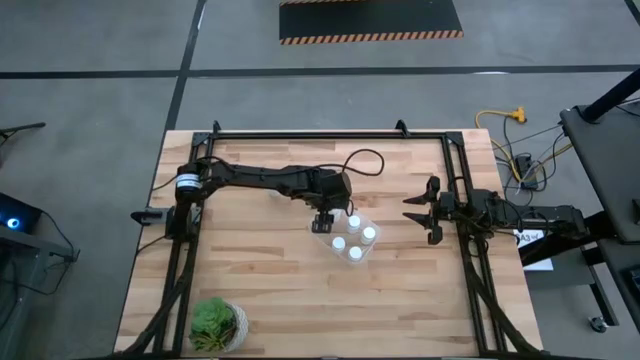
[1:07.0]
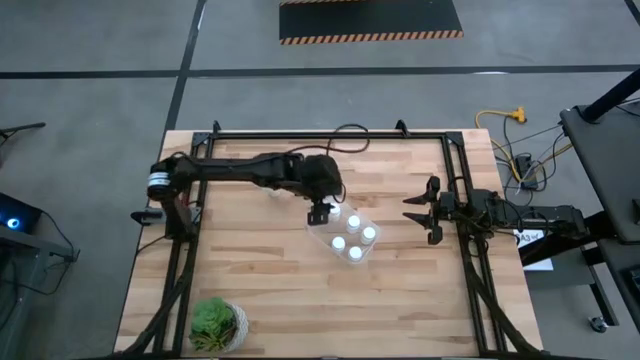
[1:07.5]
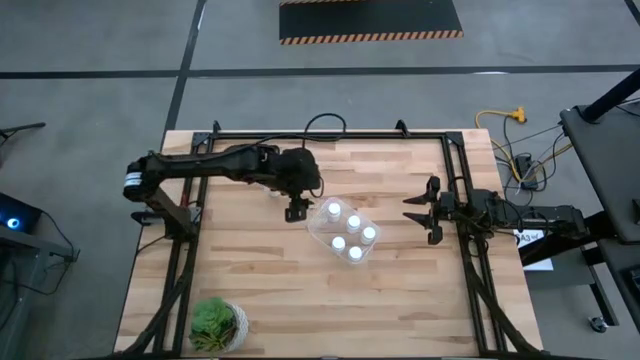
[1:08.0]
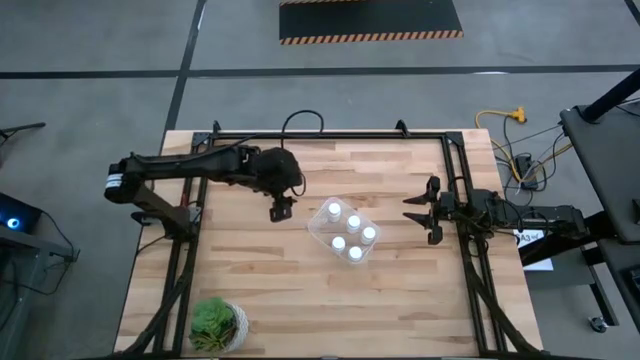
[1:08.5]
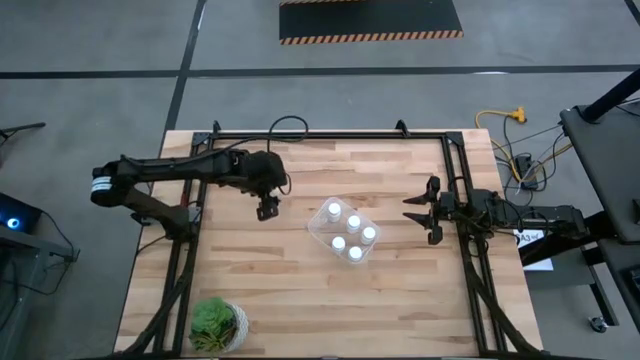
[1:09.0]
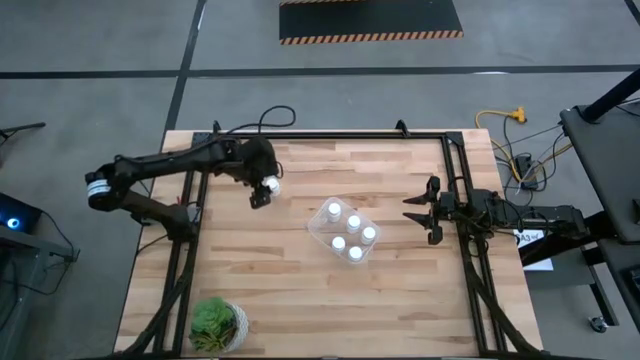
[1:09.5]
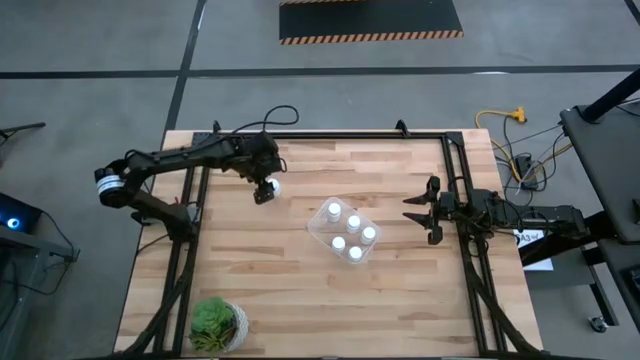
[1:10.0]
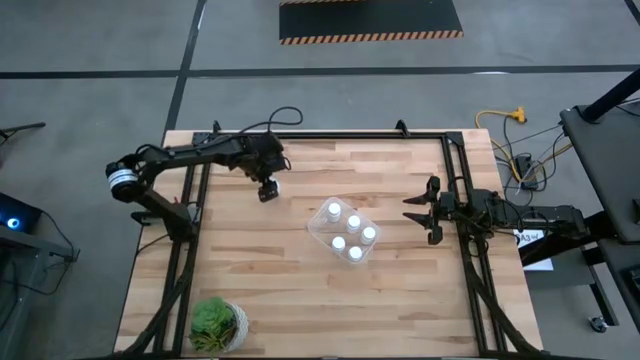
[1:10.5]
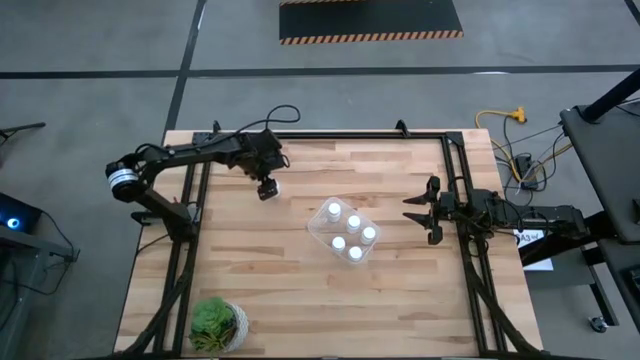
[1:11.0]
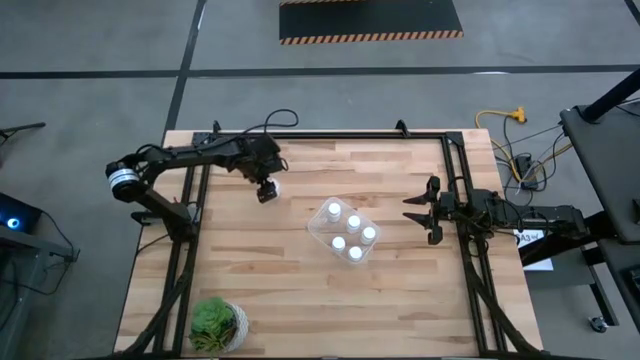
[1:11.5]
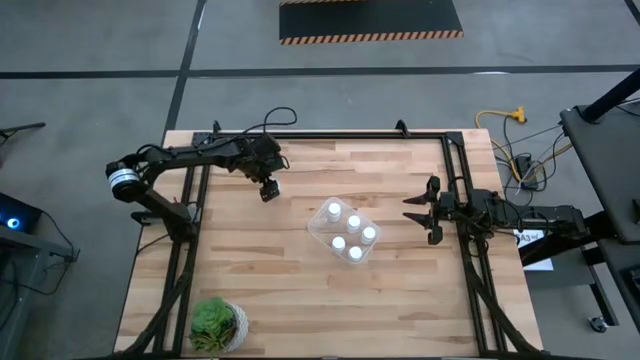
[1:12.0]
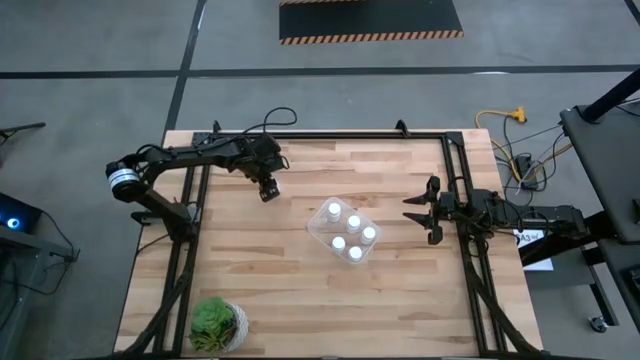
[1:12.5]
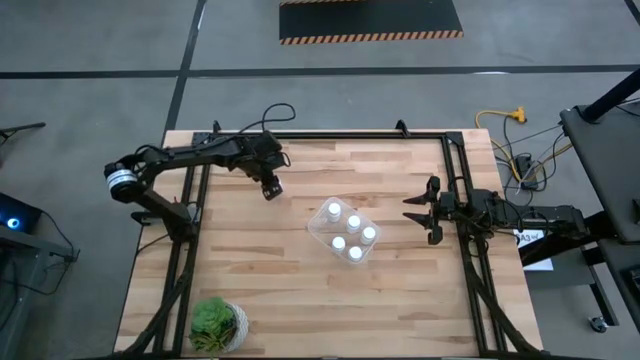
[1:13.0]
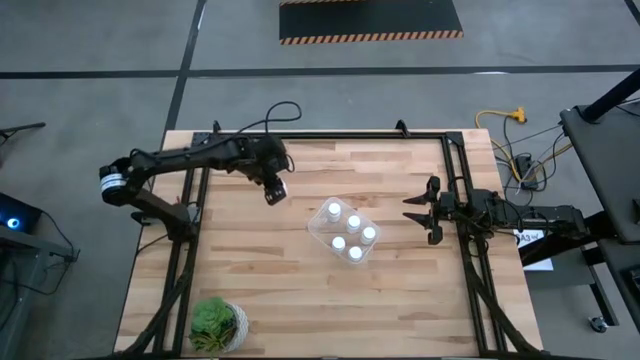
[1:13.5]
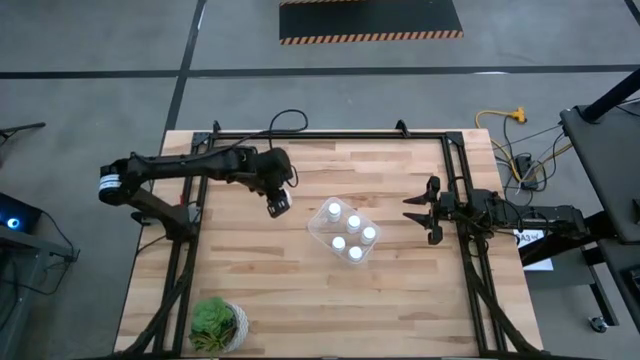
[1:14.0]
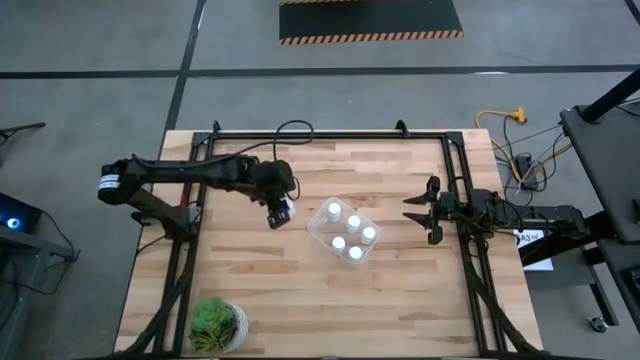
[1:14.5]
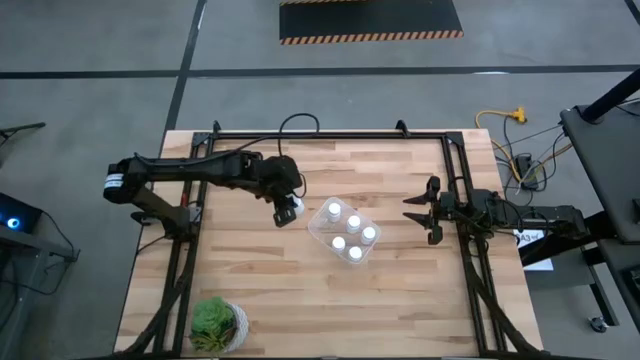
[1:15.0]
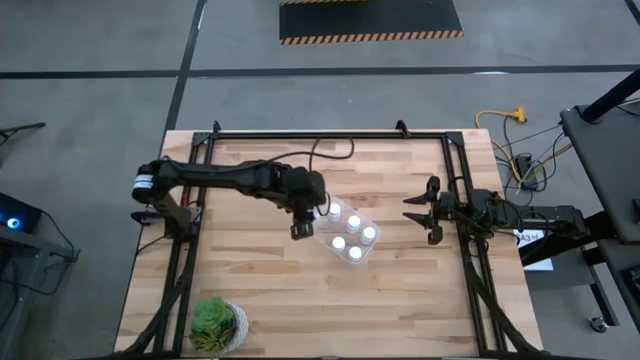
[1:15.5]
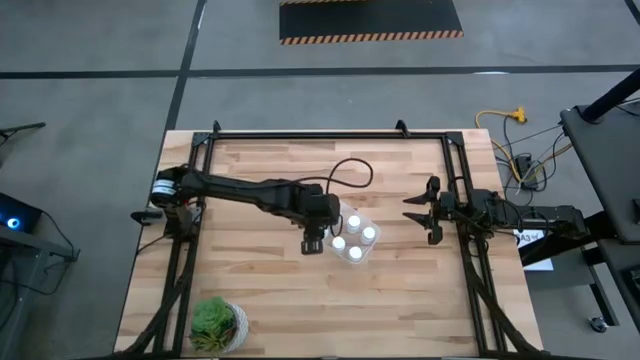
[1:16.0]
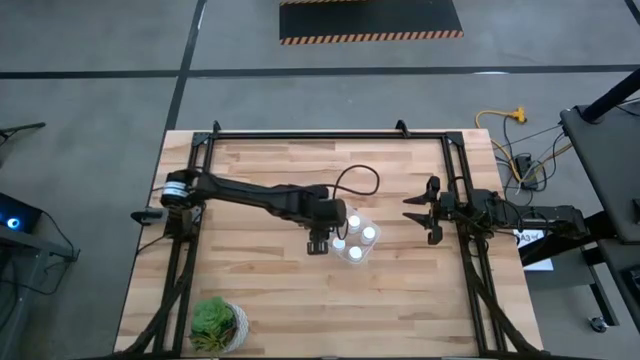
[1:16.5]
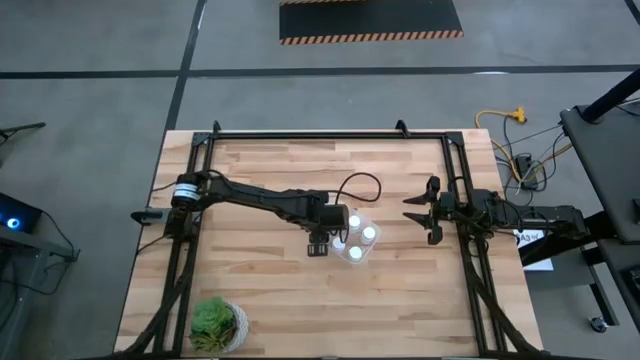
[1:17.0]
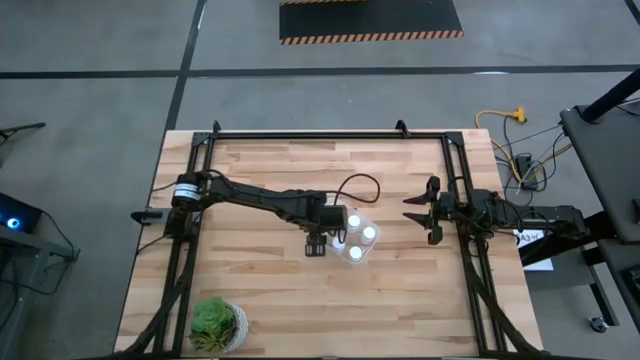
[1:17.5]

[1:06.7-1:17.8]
Task: Pick and place pill bottles into a basket
Put the white pill bottle into the transparent bin

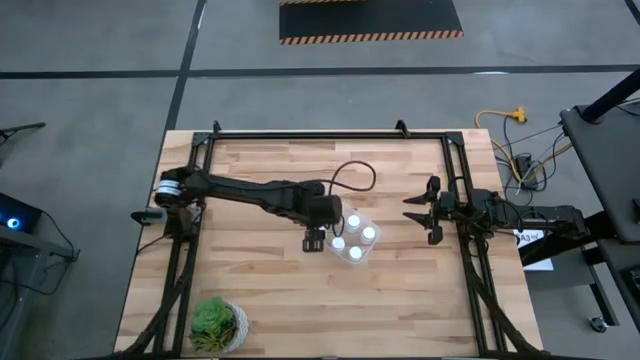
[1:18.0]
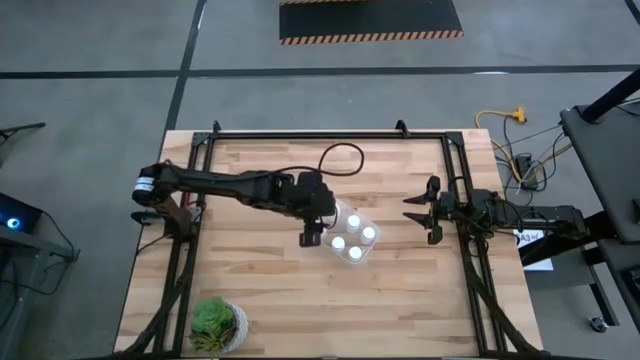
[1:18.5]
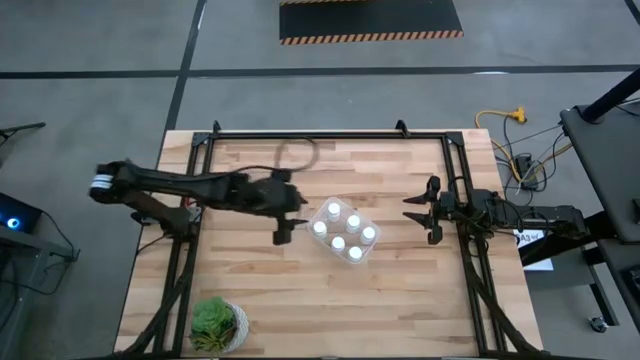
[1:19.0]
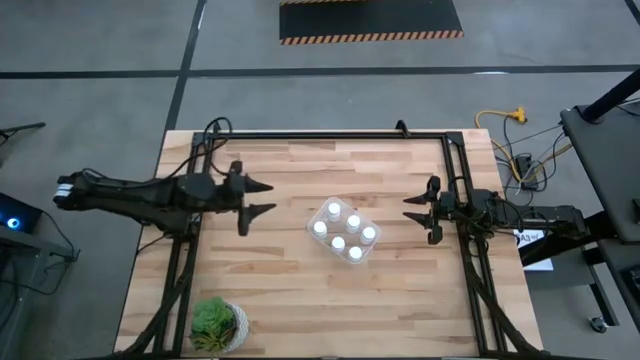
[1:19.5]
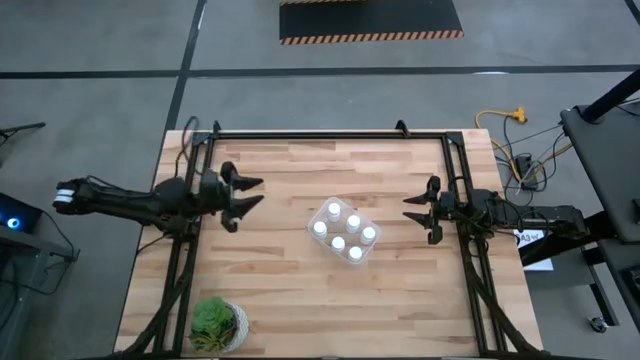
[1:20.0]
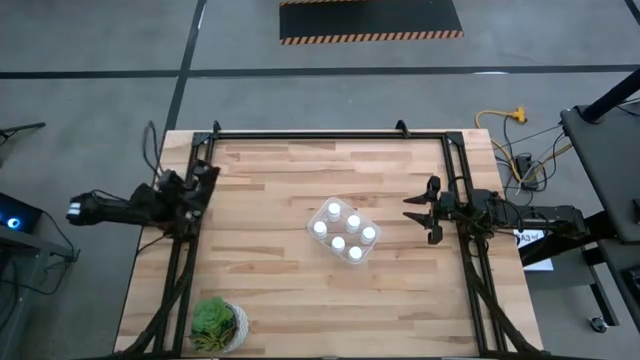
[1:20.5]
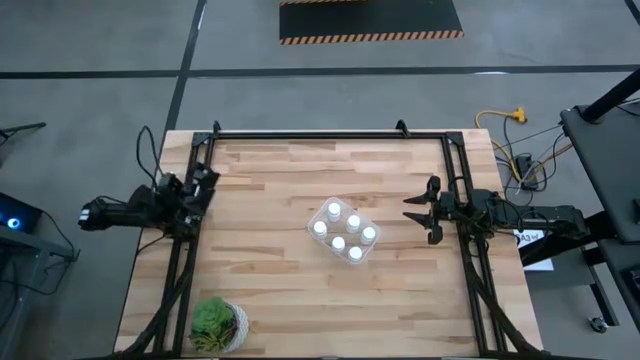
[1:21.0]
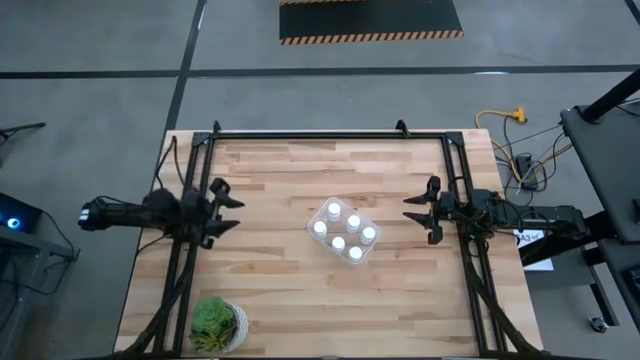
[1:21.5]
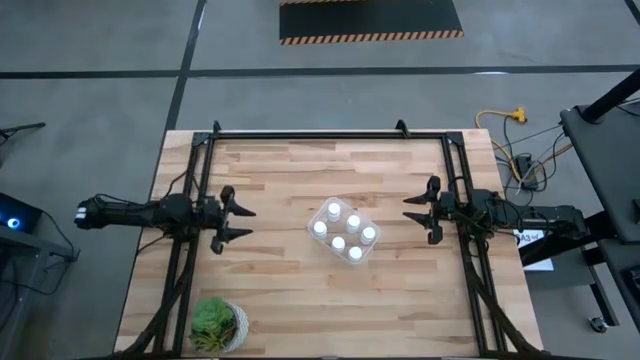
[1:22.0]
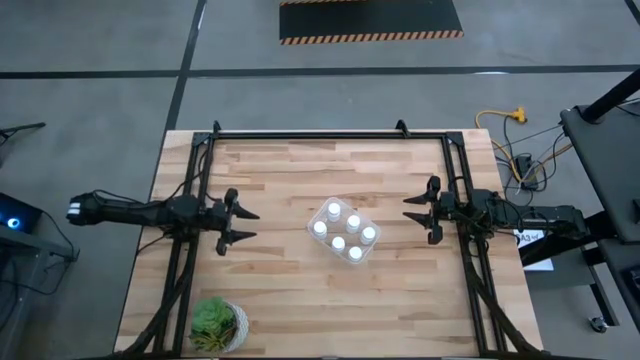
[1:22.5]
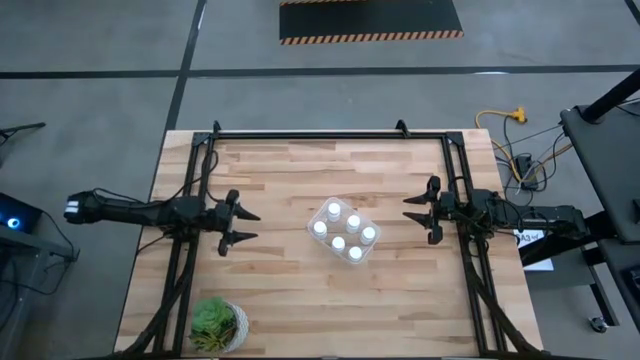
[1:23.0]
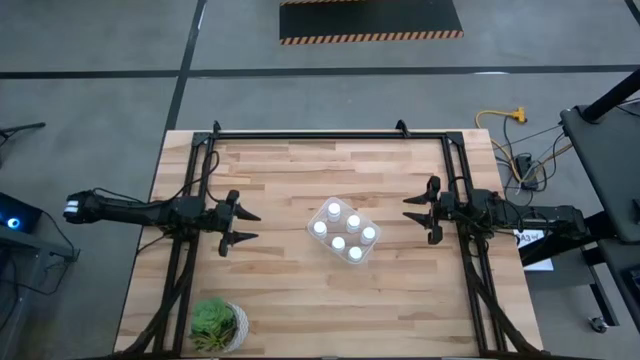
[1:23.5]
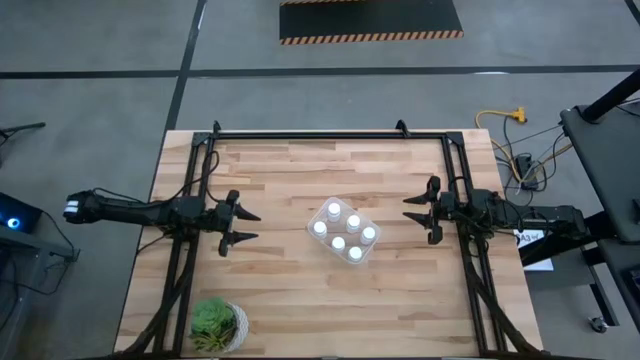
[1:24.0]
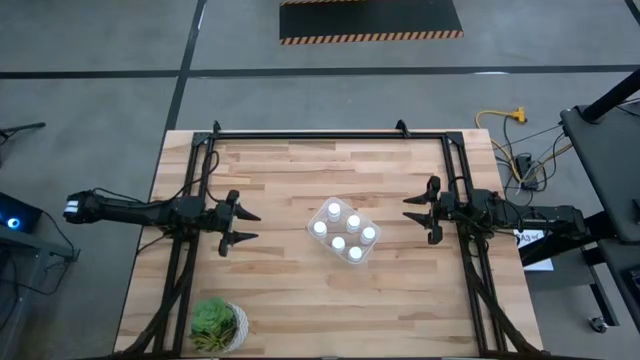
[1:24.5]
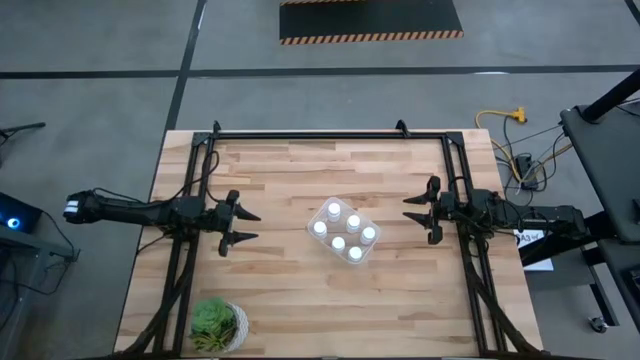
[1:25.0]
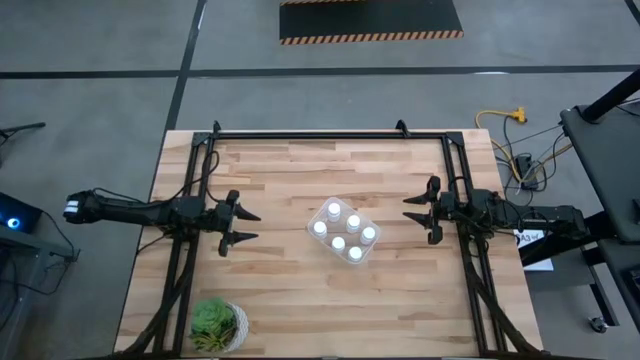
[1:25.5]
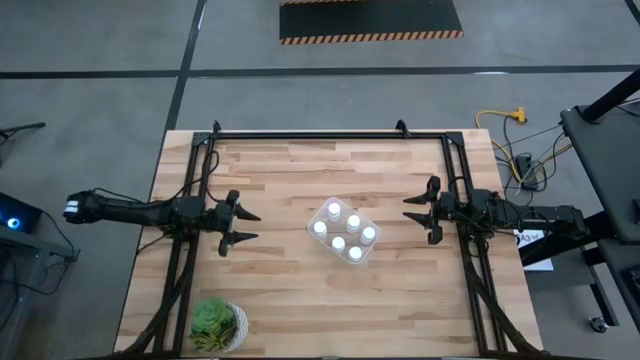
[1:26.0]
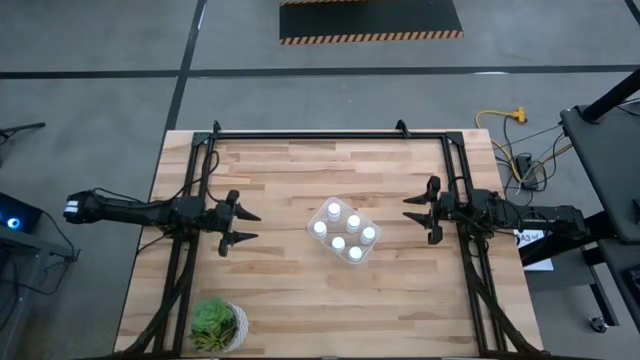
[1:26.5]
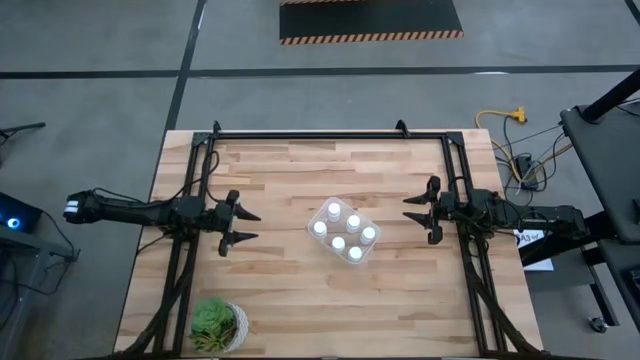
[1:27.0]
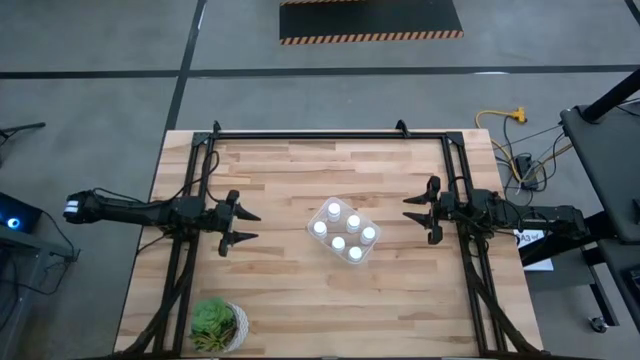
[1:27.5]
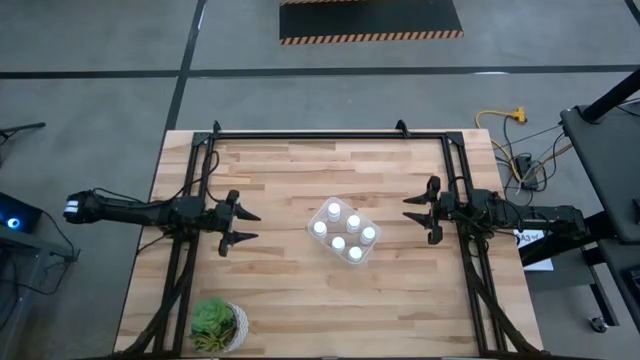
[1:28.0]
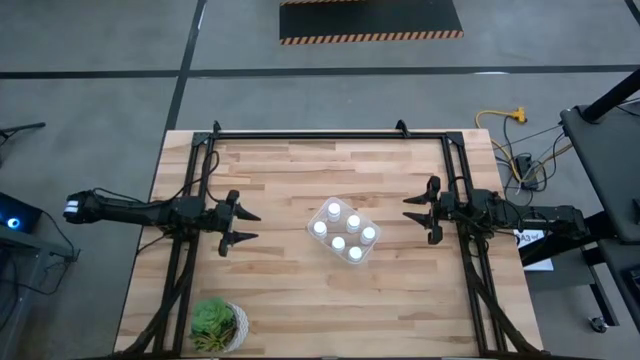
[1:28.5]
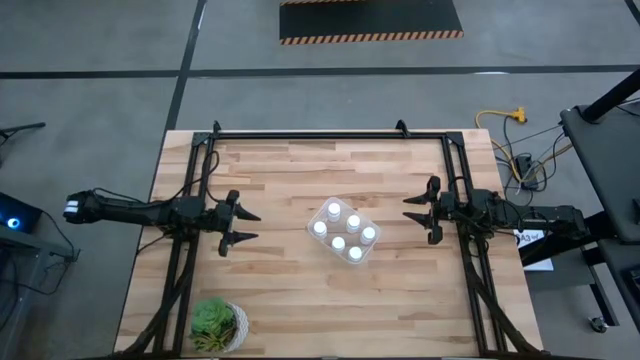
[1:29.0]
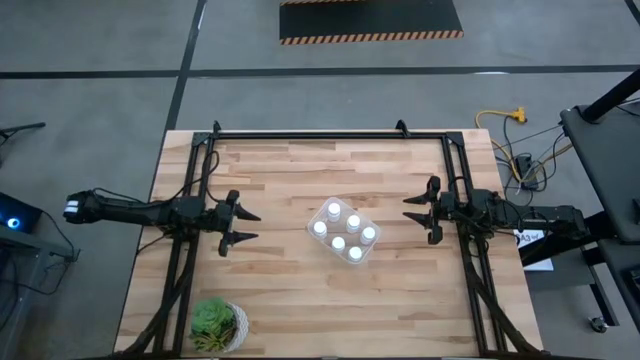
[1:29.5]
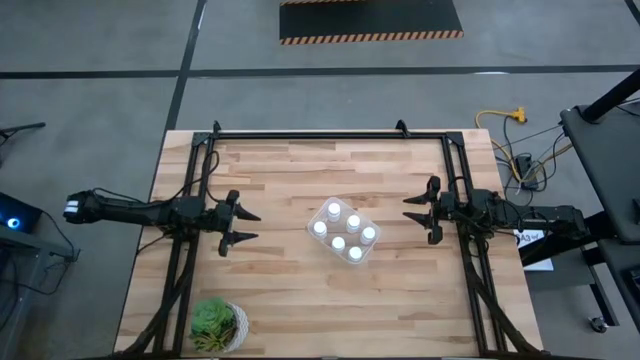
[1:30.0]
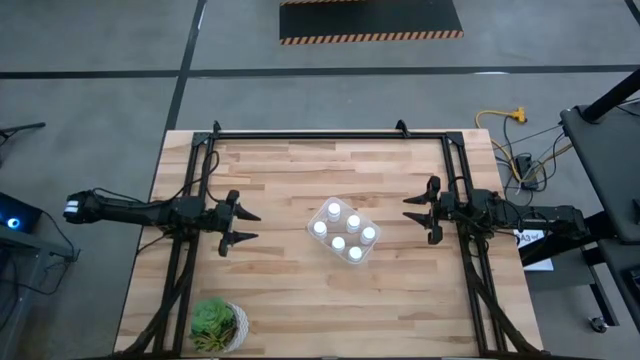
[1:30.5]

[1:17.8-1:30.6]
Return to Home Position
